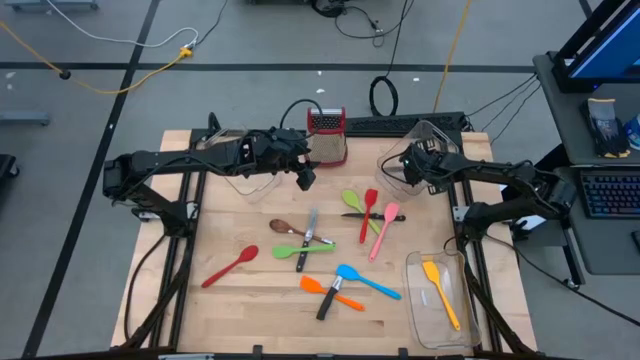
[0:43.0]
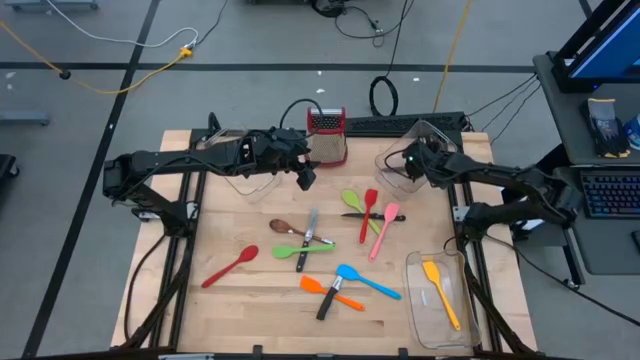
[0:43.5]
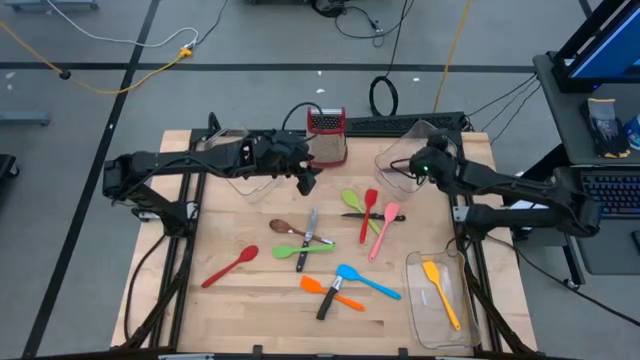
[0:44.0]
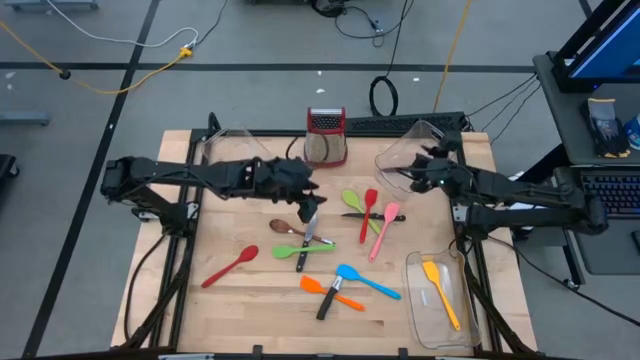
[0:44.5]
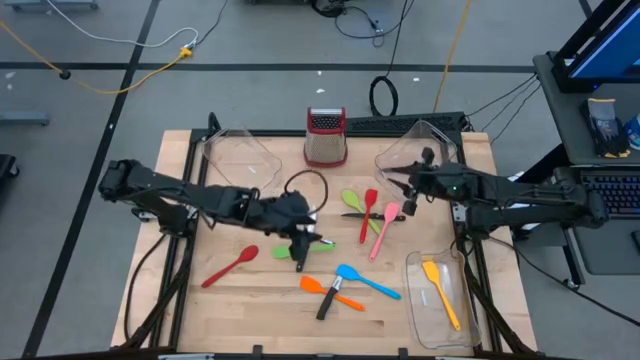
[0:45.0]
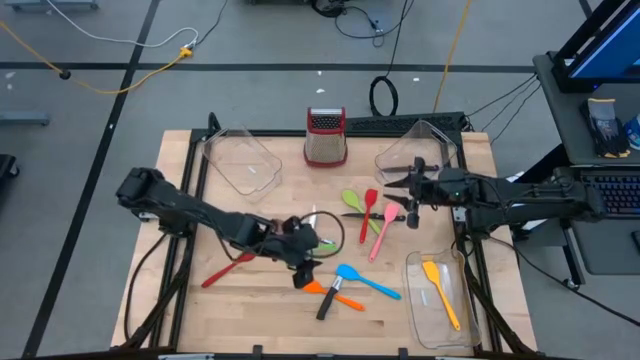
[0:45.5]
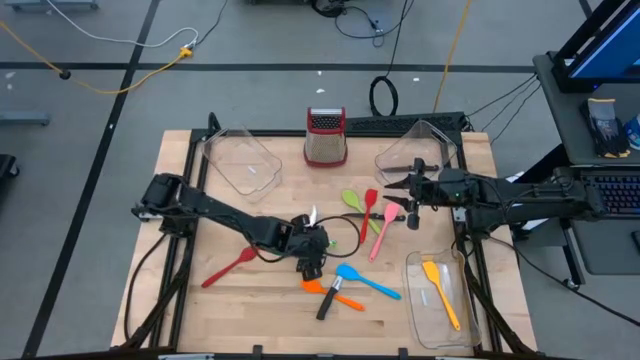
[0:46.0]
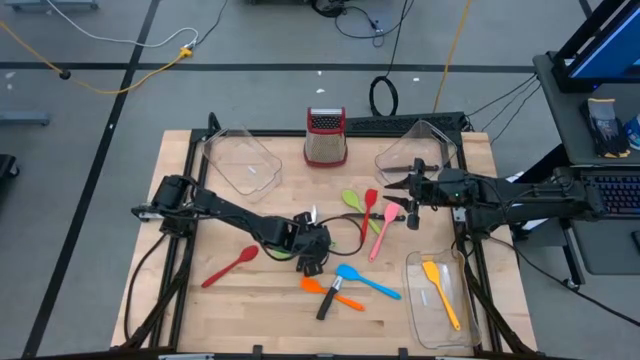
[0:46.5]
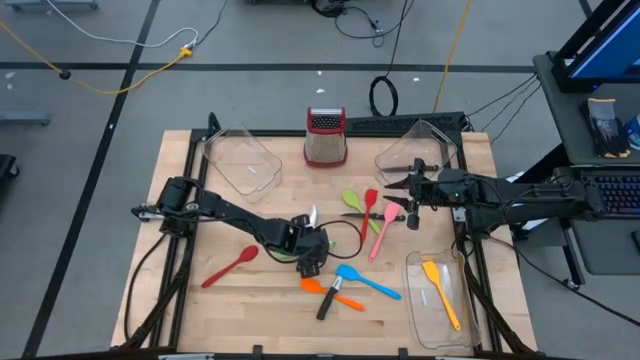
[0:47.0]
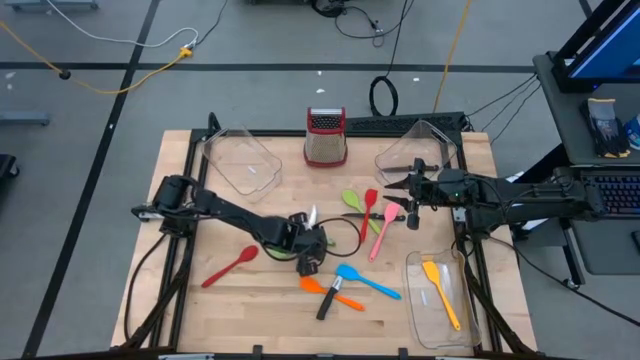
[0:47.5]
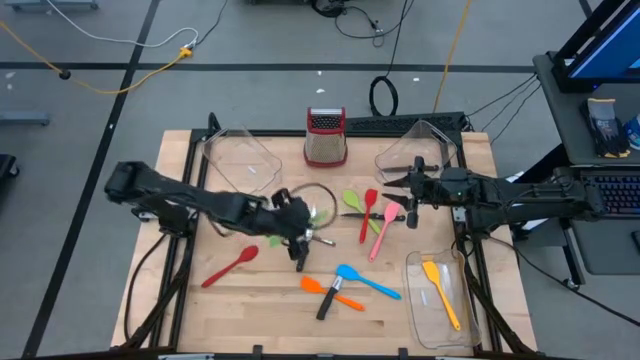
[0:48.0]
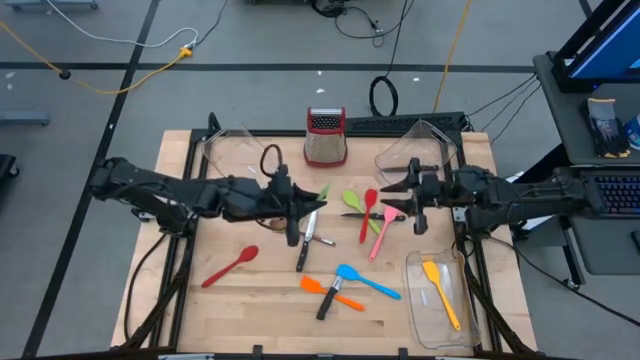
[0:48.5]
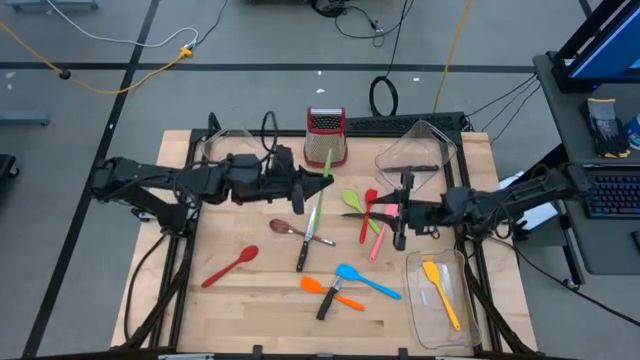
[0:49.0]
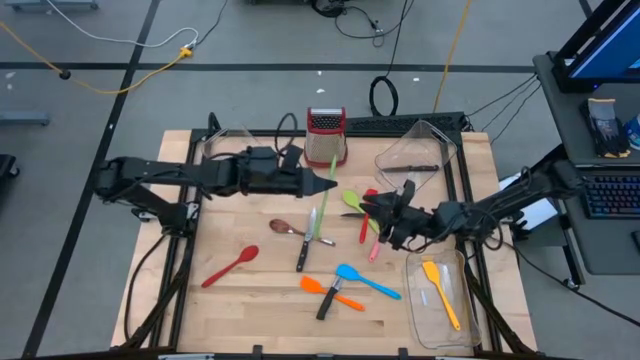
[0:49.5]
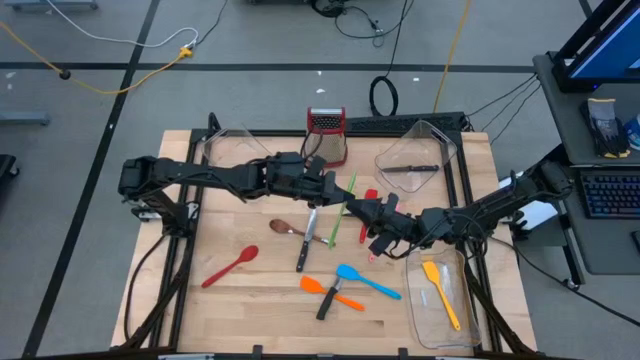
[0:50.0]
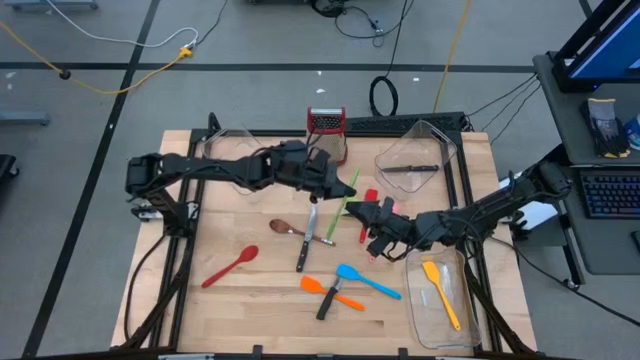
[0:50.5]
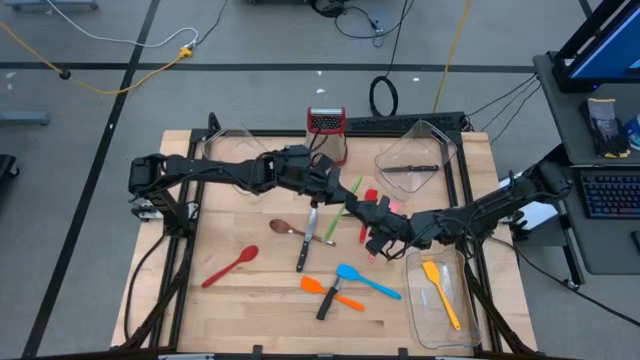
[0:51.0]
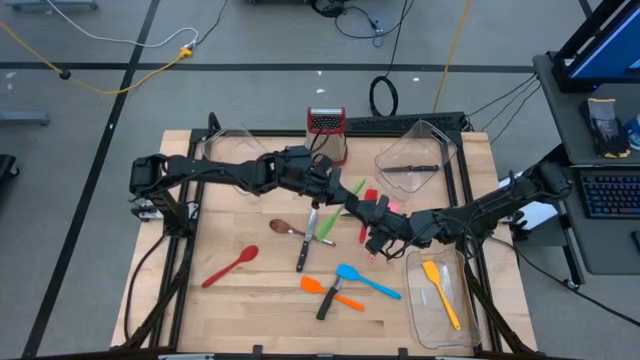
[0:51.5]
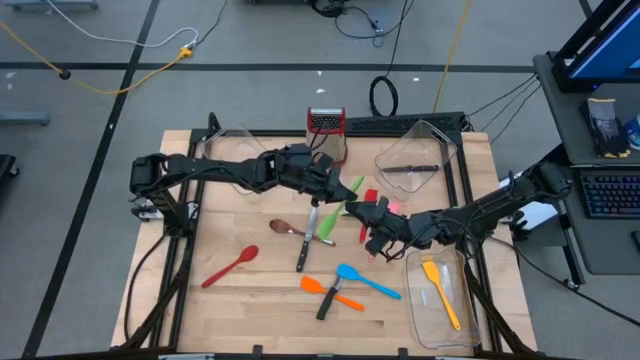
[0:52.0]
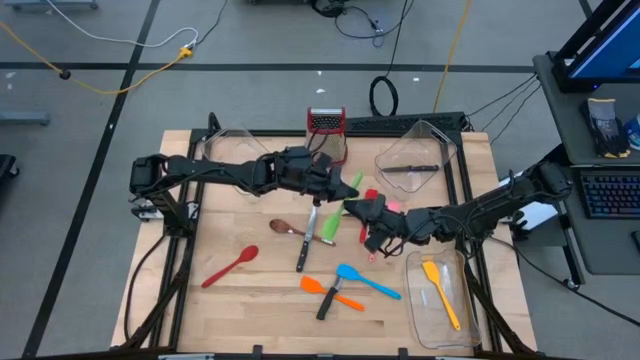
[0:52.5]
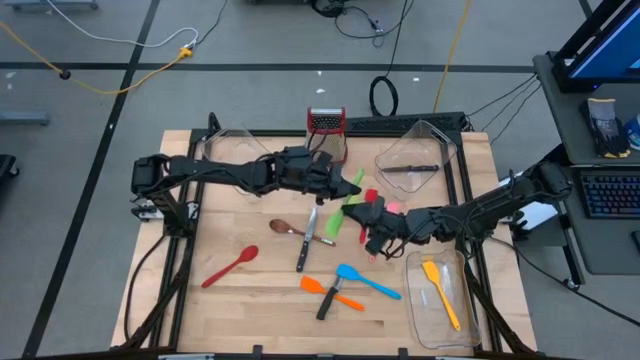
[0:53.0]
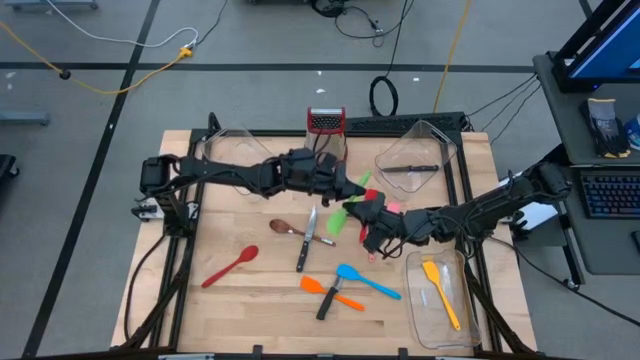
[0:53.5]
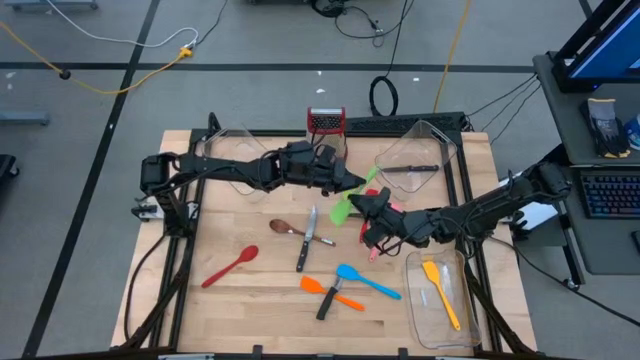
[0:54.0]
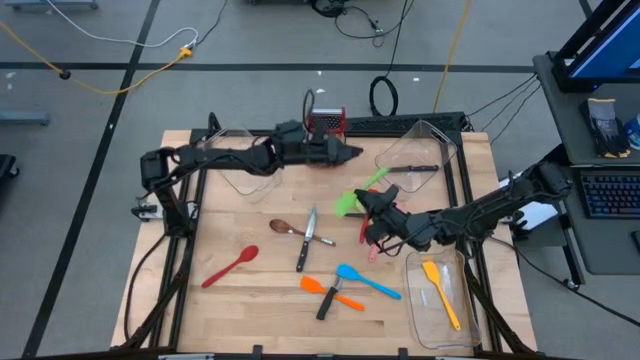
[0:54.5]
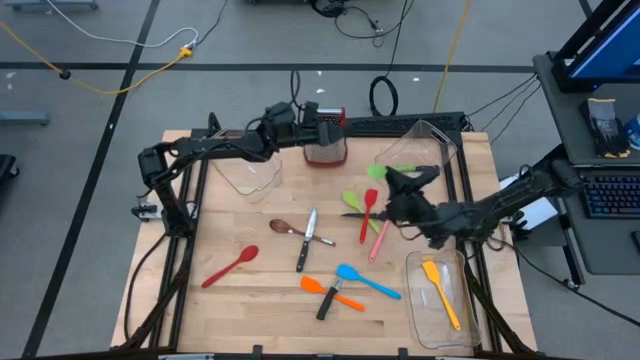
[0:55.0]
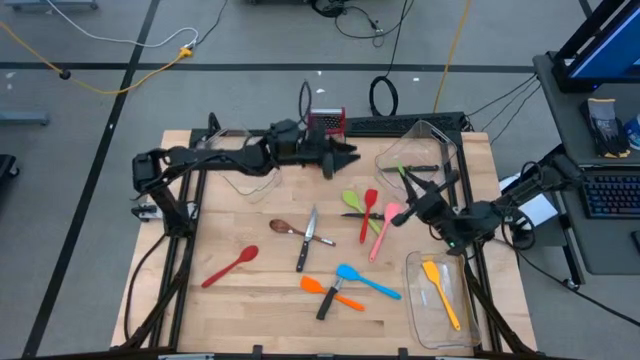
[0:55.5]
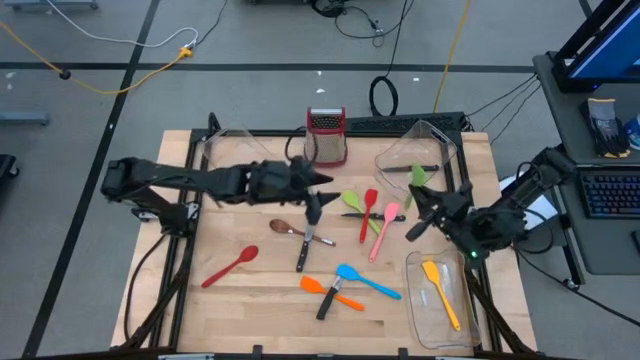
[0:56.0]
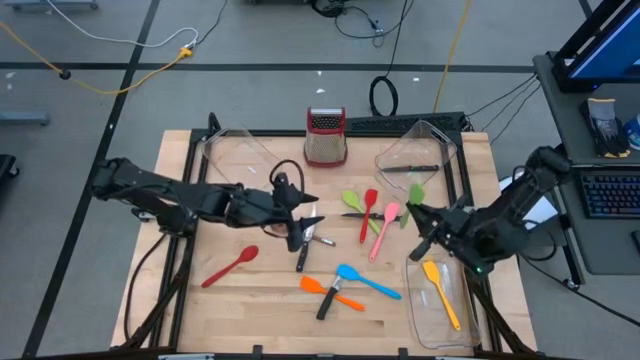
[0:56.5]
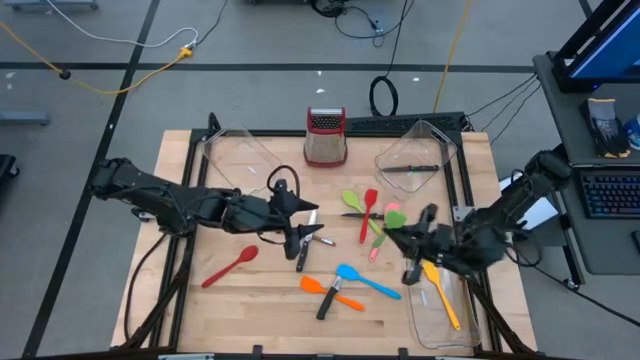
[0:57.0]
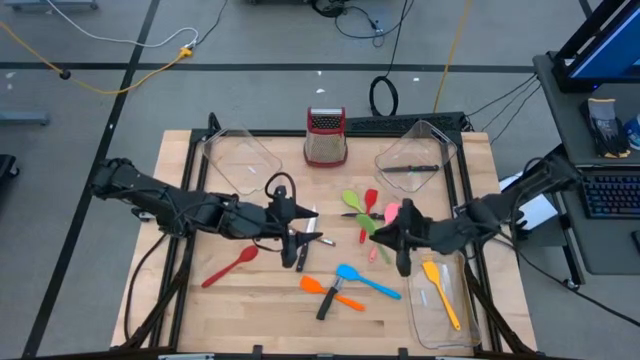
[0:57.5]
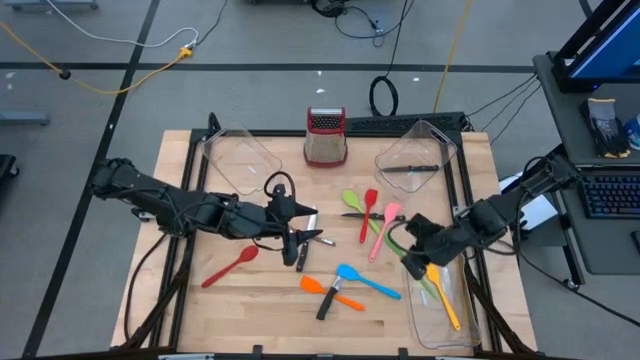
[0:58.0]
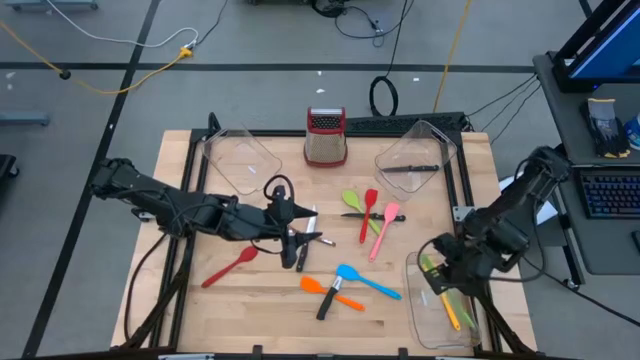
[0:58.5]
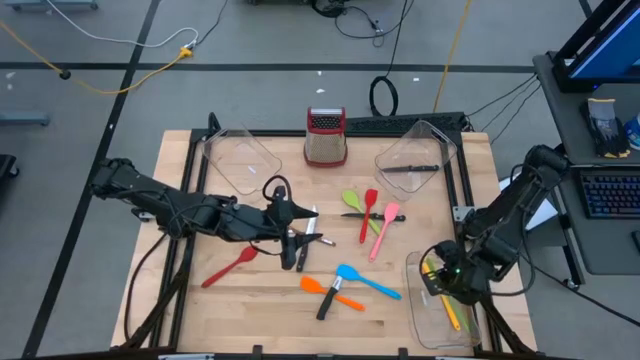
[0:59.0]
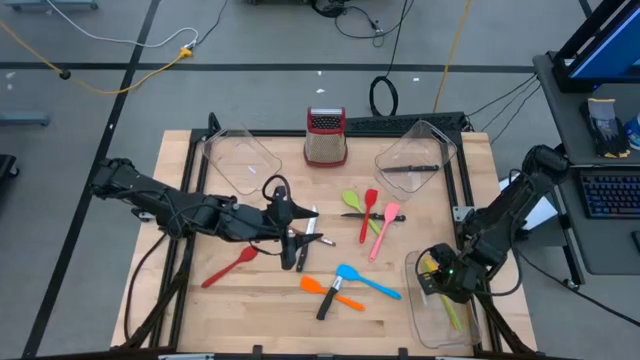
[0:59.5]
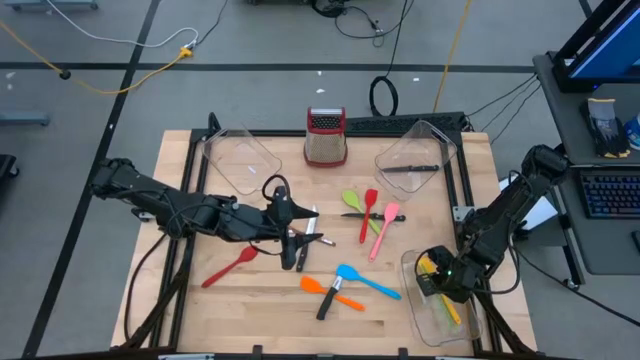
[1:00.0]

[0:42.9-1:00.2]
Task: Pick & Place Kitchen Items
Put the green spatula into the bottom transparent bin

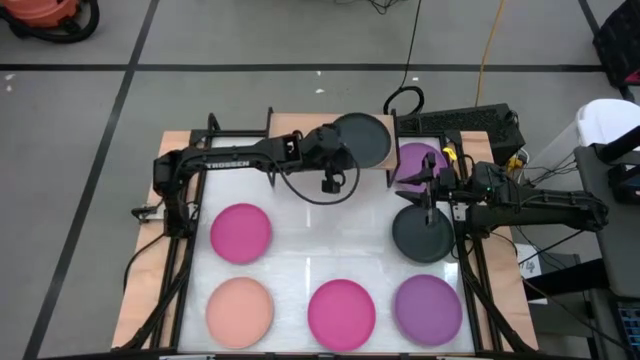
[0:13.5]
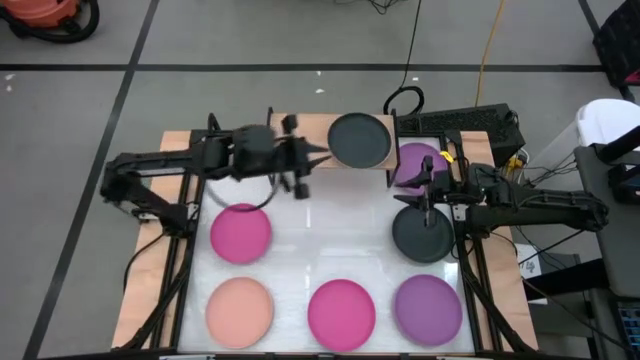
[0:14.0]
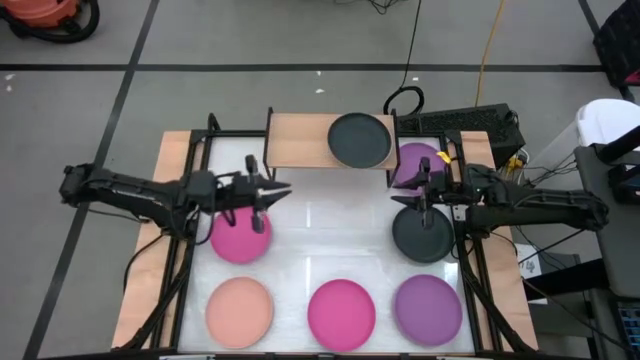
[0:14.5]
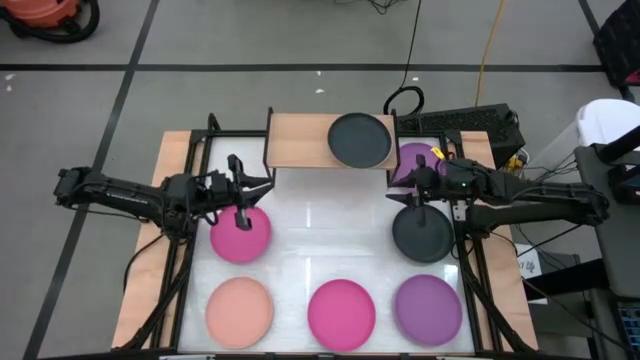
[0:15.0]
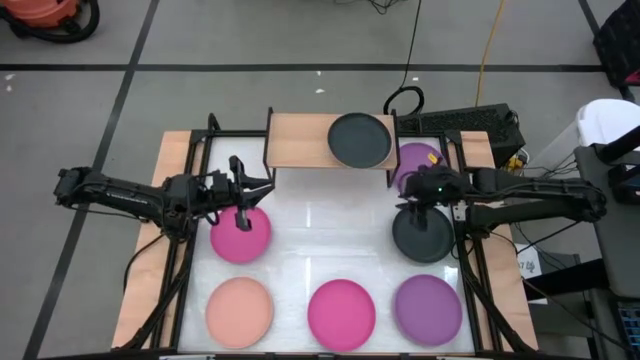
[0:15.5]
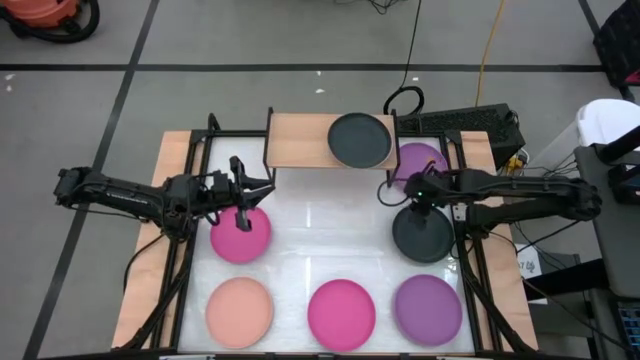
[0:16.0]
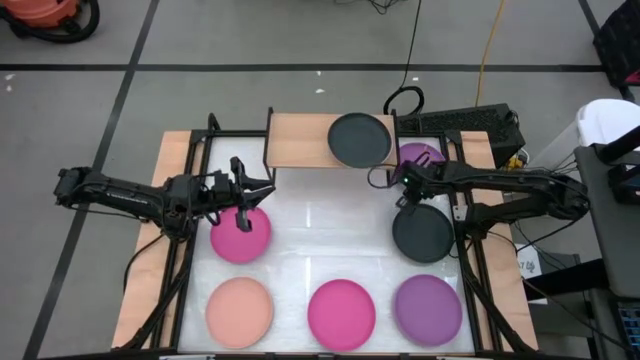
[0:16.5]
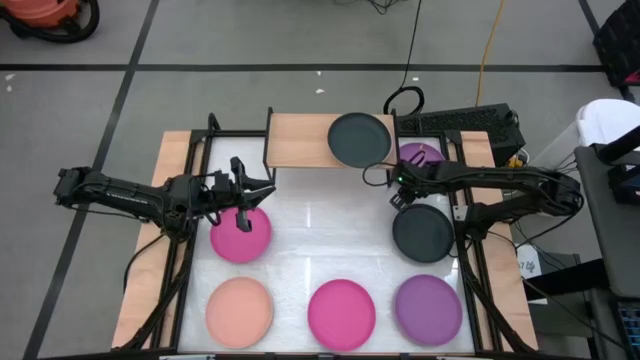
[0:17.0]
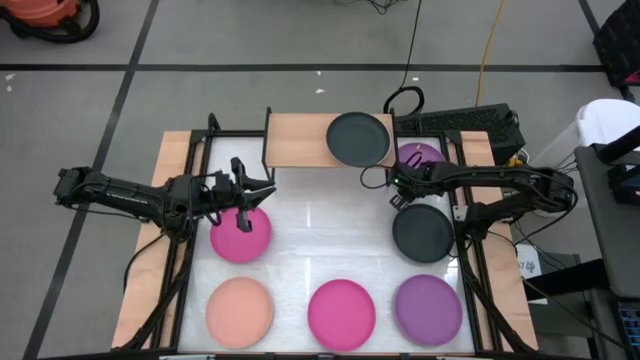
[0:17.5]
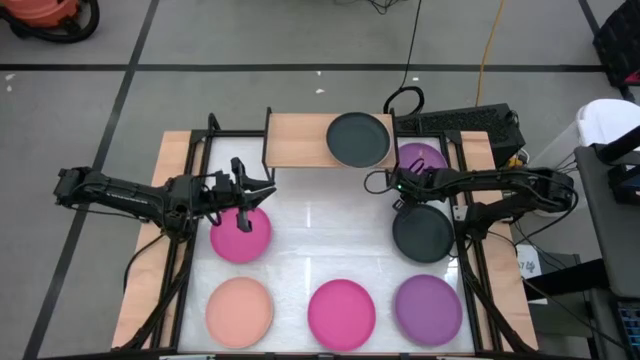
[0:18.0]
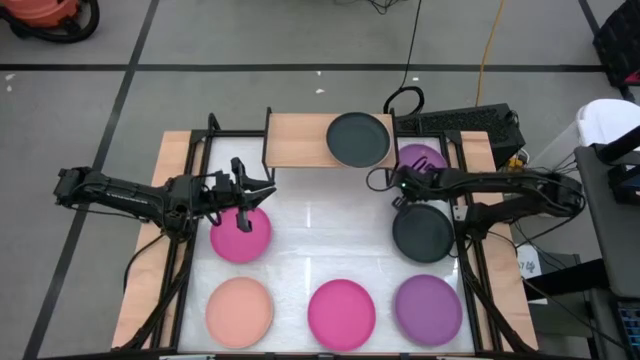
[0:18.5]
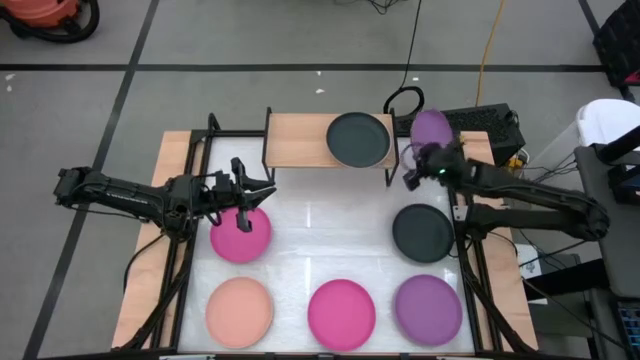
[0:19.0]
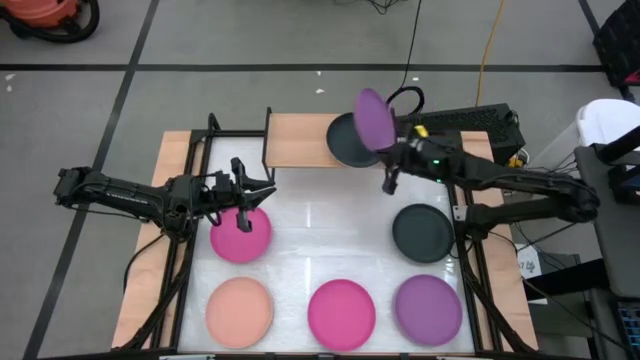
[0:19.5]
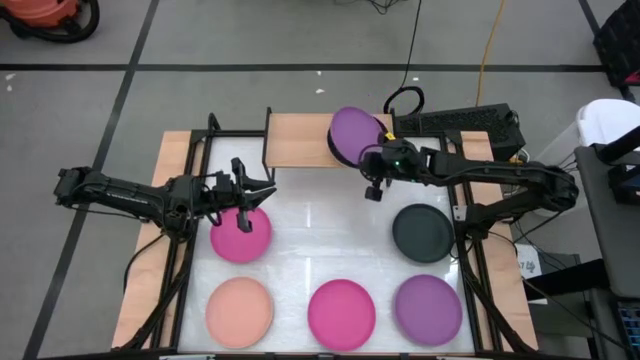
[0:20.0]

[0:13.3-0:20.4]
Task: Place and stack plates onto a shelf
Stack the top purple plate on the black plate on the shelf
